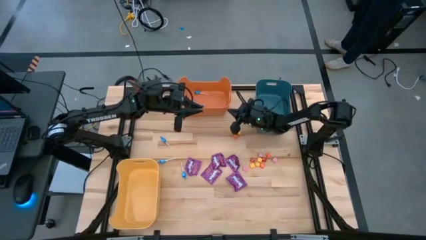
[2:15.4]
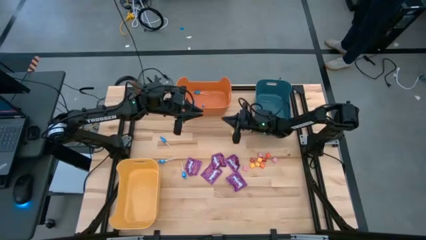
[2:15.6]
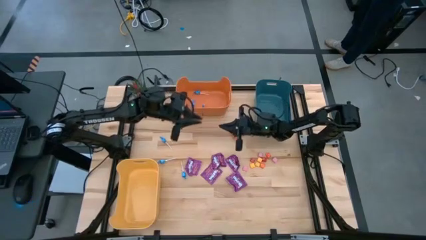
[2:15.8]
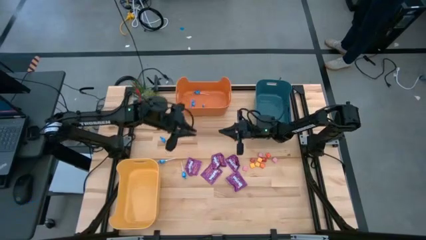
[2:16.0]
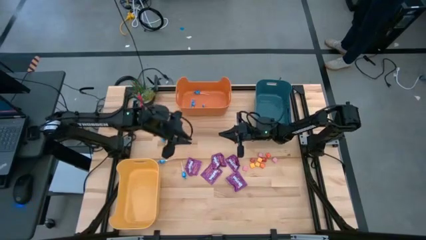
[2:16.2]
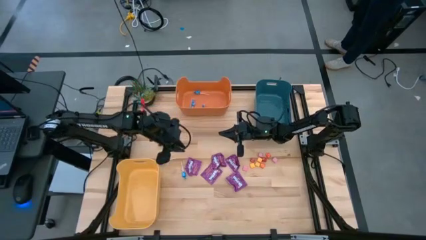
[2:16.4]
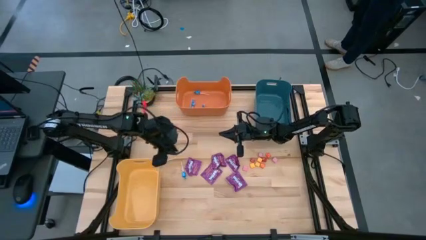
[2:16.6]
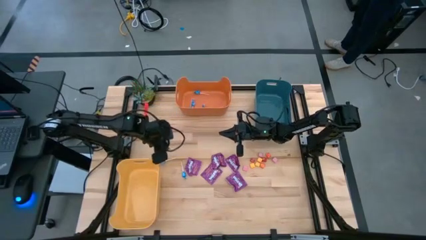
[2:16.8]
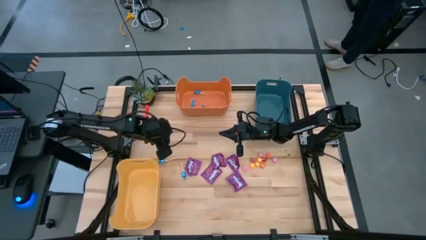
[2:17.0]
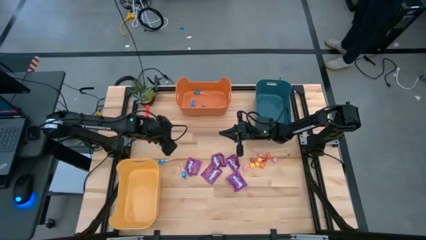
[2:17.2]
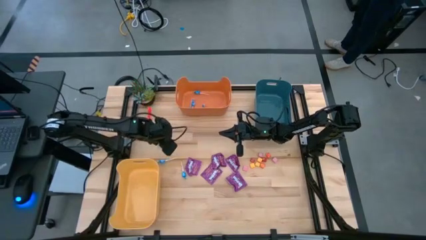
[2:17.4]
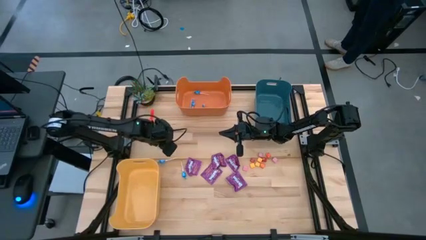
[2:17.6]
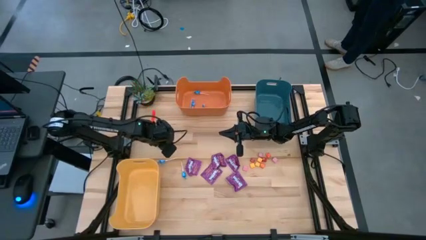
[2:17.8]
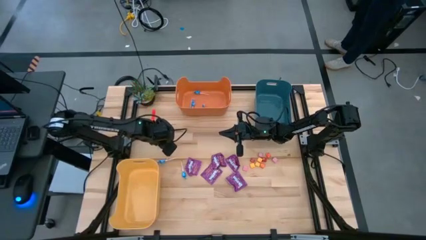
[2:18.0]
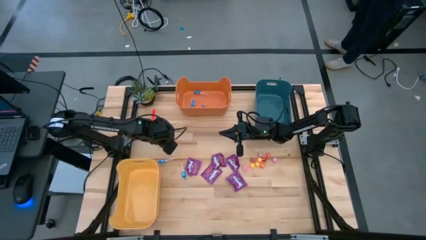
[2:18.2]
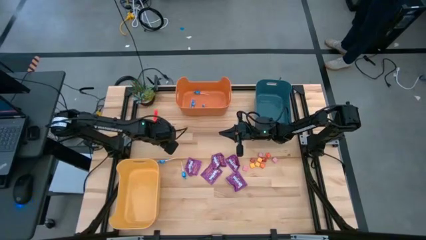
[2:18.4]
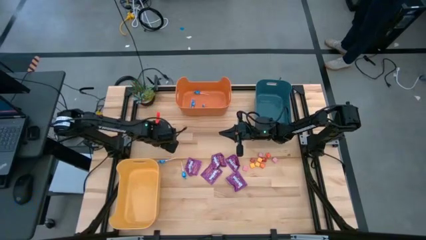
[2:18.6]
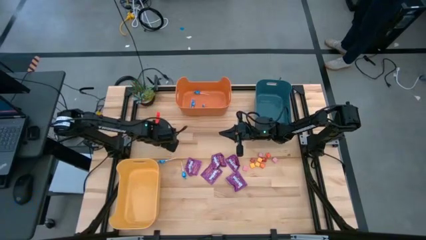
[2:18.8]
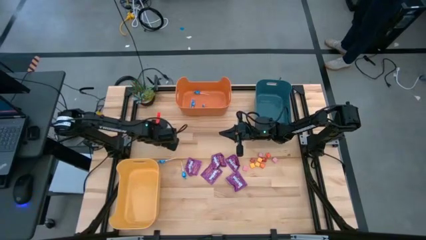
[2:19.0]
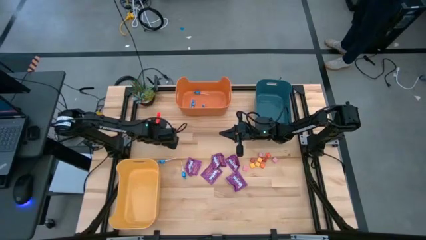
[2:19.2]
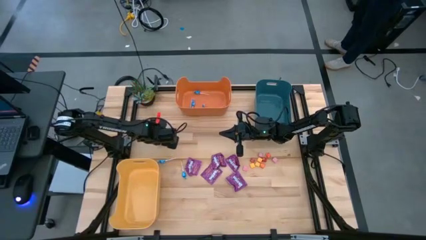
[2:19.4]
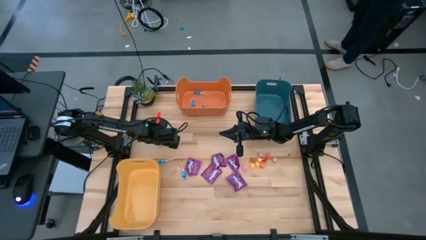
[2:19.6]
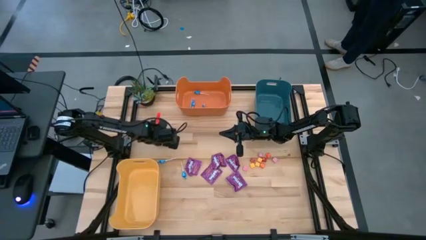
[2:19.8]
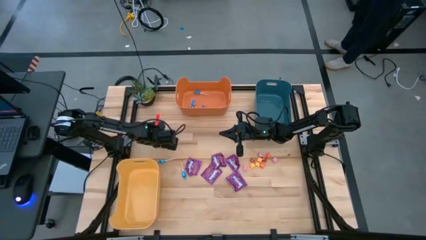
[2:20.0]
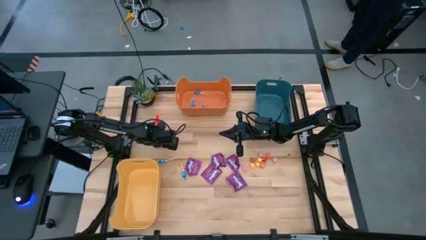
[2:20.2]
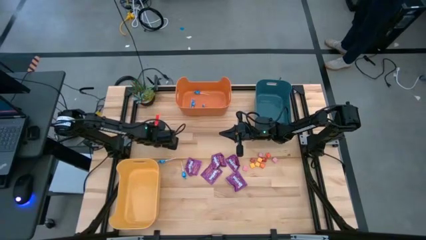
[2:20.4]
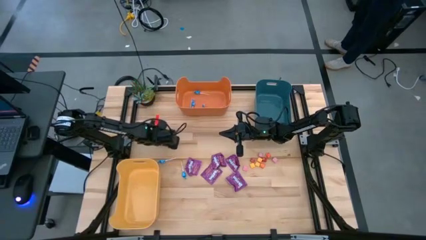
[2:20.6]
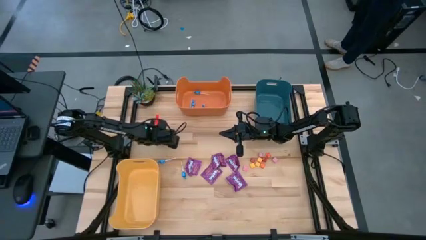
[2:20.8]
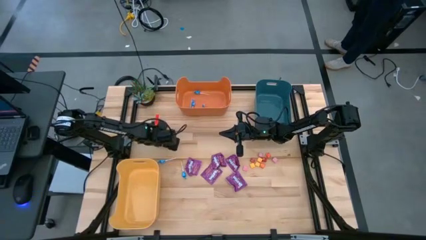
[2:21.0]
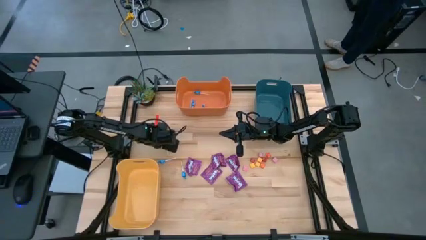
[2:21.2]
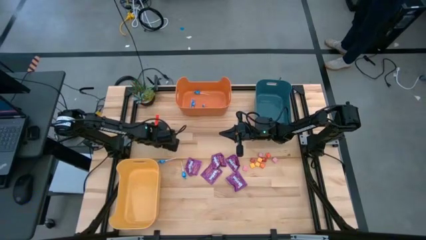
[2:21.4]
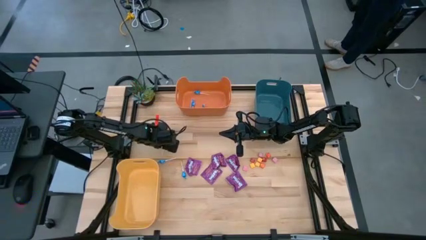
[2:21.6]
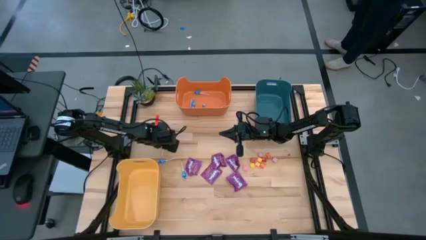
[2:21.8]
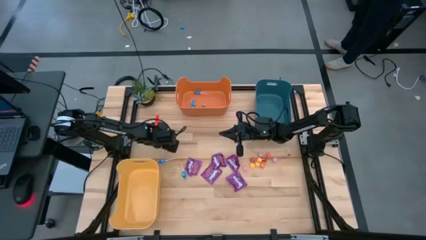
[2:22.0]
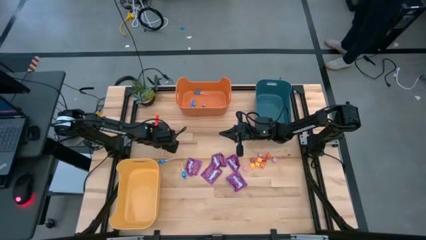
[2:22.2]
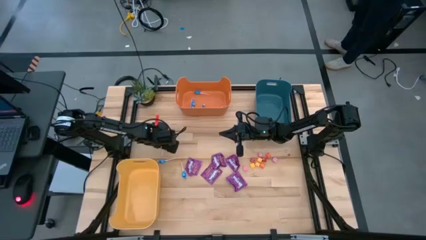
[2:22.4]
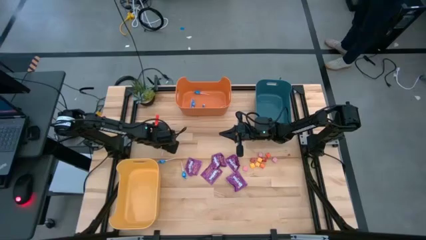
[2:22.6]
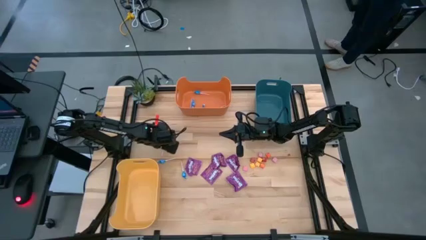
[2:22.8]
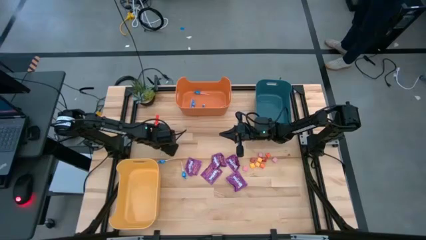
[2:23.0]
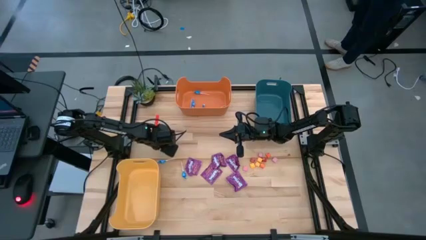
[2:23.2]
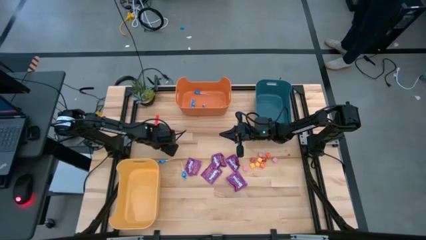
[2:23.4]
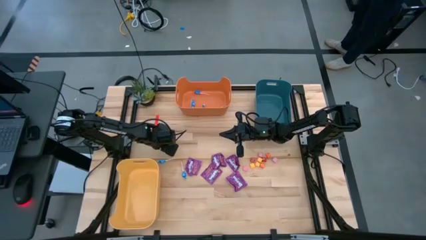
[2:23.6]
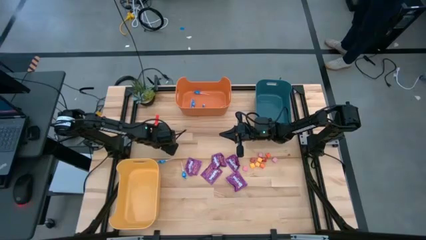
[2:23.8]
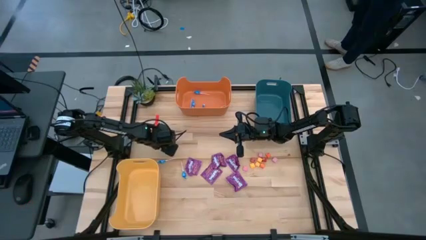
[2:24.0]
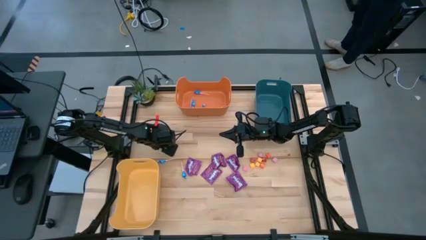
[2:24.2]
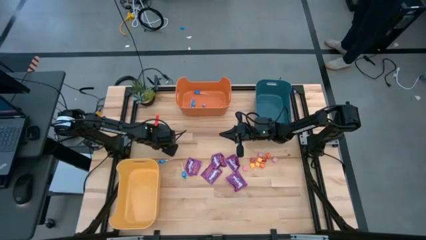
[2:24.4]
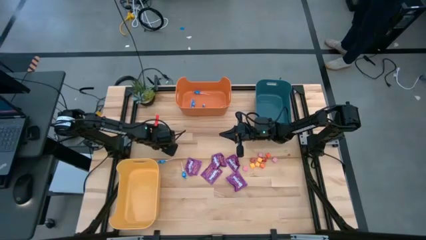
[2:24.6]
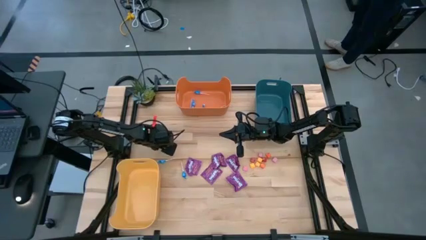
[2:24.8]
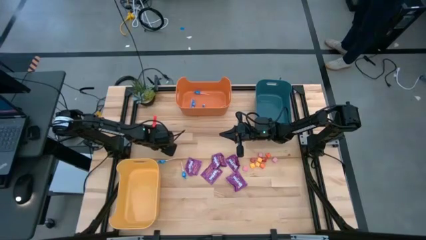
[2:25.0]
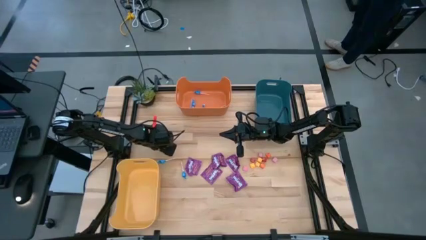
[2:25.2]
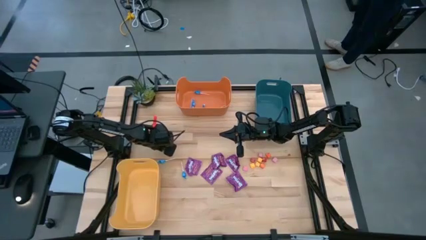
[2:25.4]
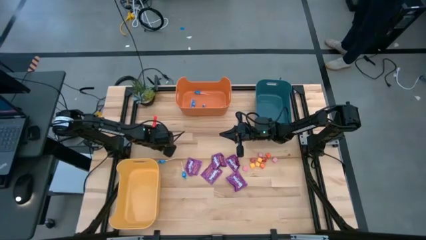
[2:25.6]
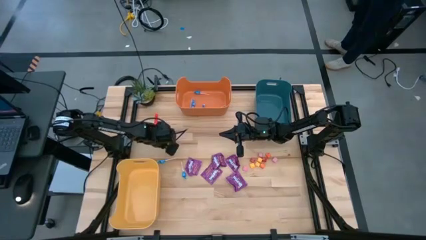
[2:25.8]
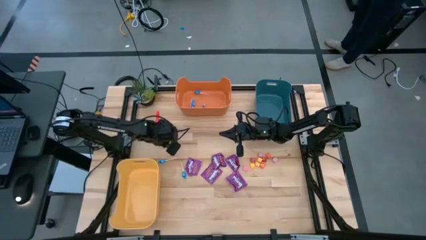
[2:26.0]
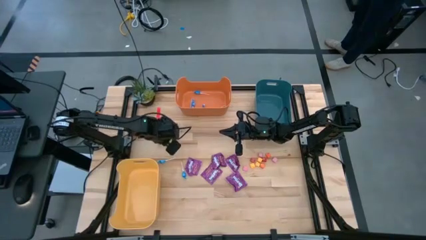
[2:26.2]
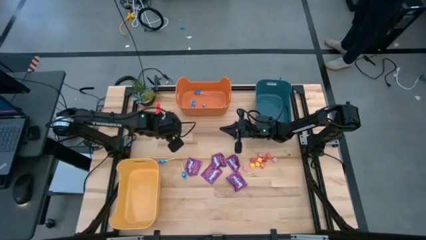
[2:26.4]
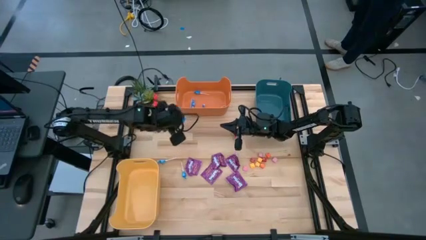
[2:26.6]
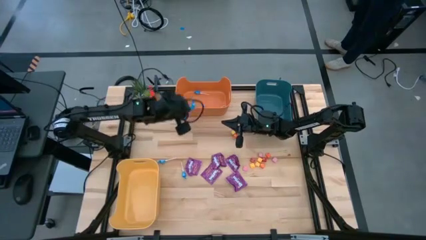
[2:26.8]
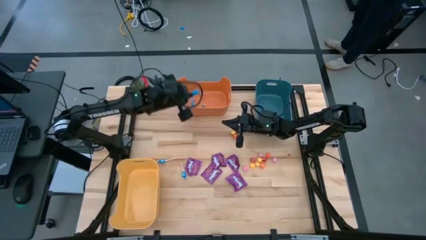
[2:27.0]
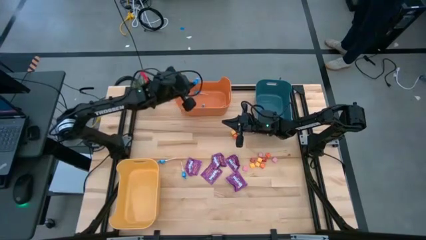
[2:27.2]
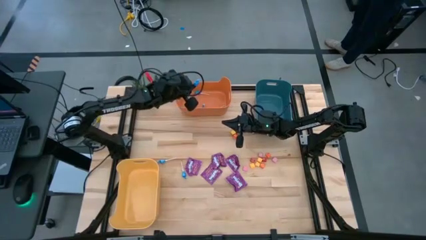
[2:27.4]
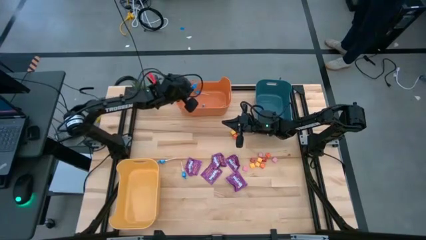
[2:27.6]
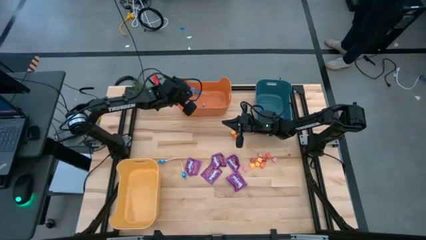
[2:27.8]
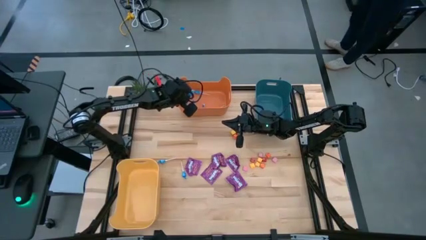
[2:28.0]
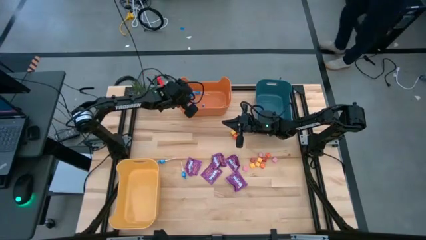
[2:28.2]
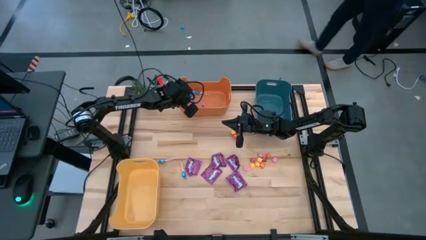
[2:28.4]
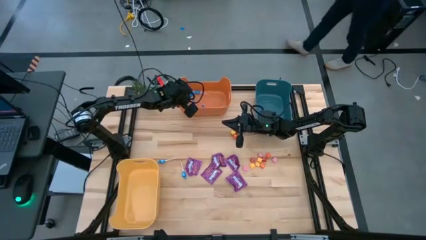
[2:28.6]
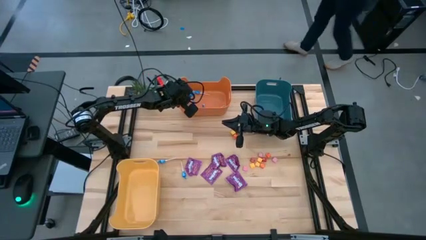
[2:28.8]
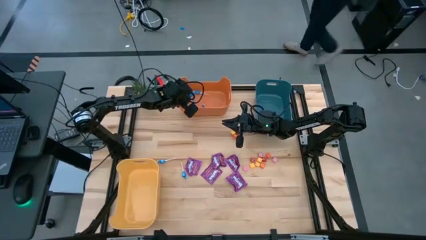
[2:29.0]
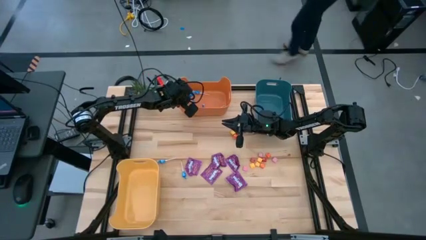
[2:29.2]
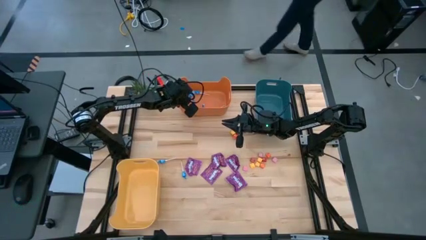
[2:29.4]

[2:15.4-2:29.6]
Task: Sort candy
Put the blue candy into the orange bin
